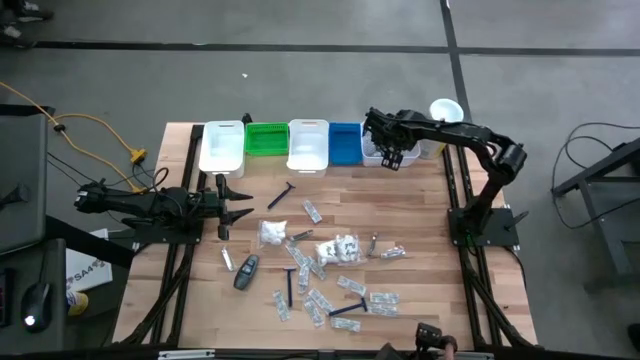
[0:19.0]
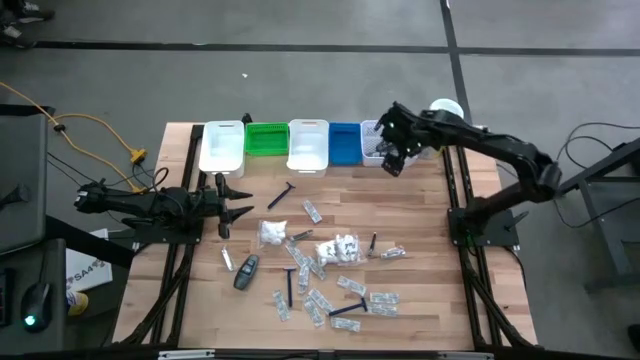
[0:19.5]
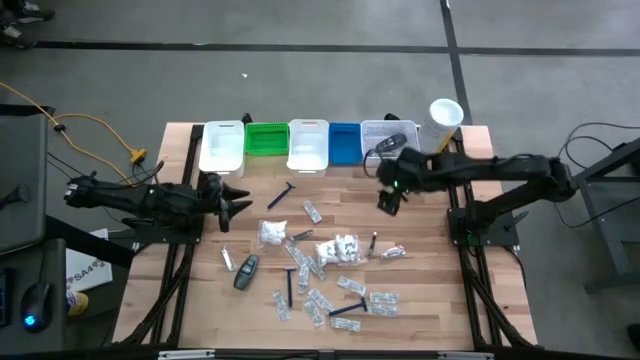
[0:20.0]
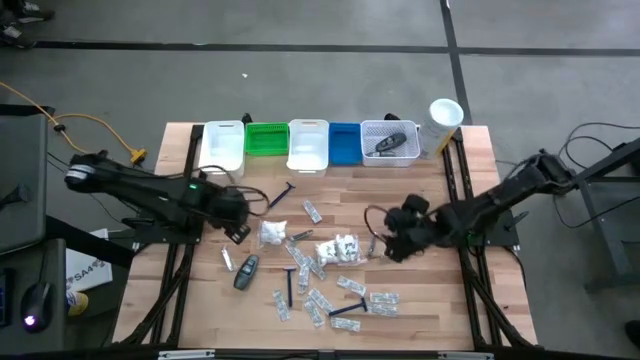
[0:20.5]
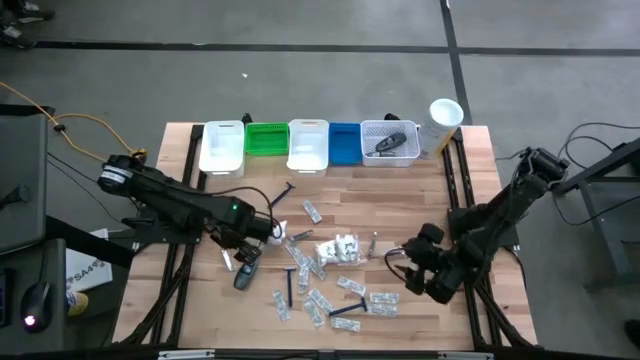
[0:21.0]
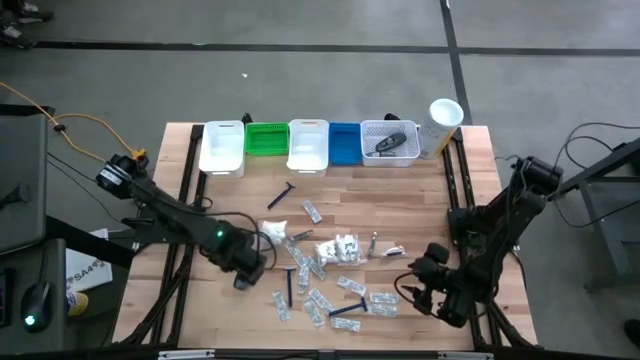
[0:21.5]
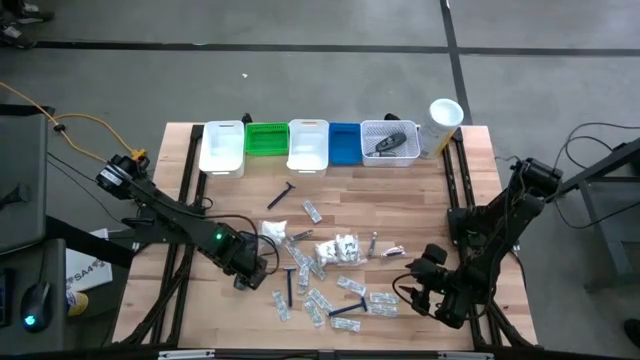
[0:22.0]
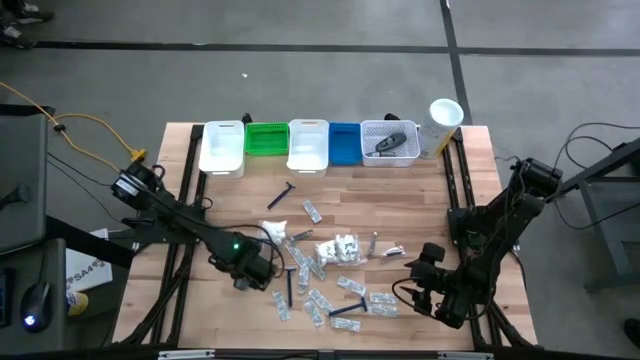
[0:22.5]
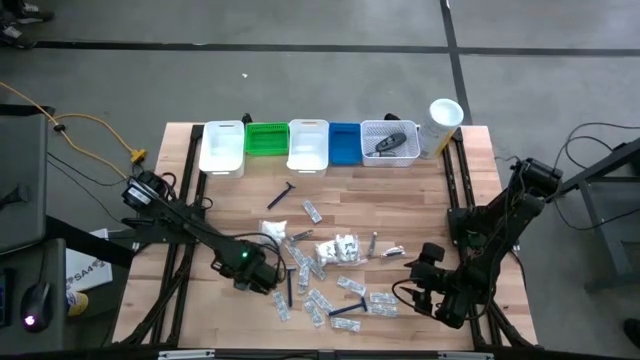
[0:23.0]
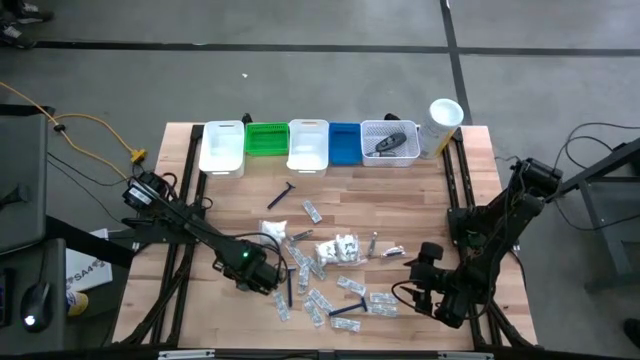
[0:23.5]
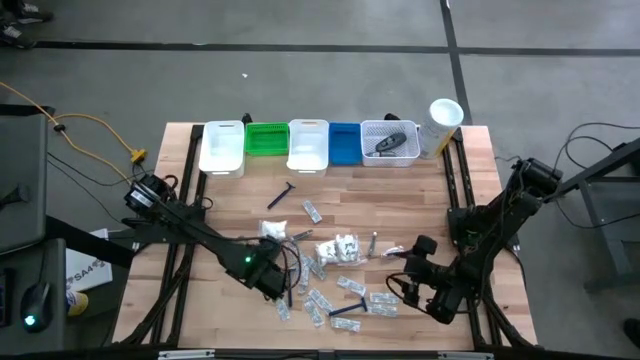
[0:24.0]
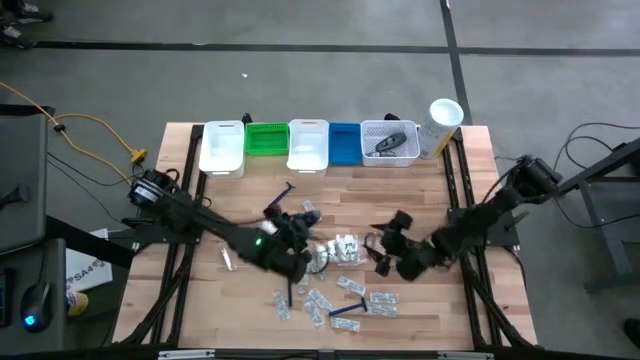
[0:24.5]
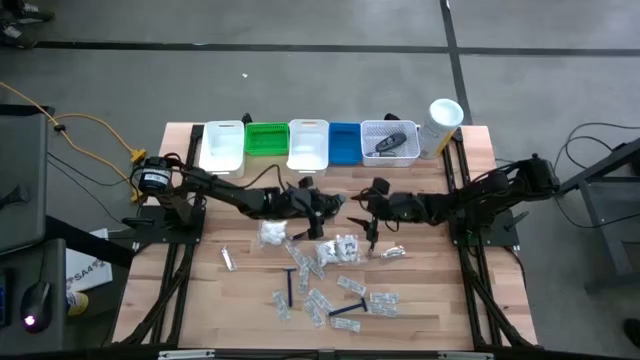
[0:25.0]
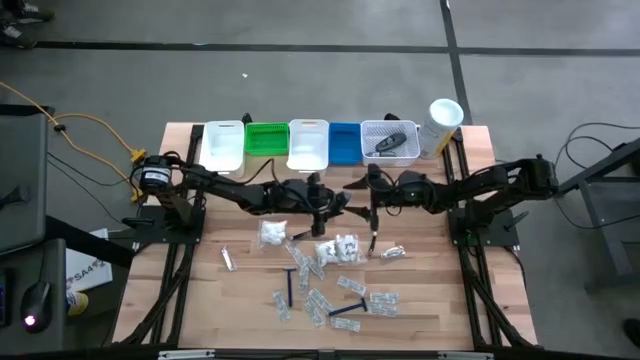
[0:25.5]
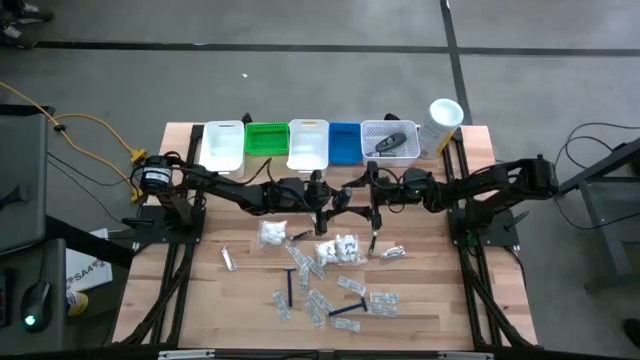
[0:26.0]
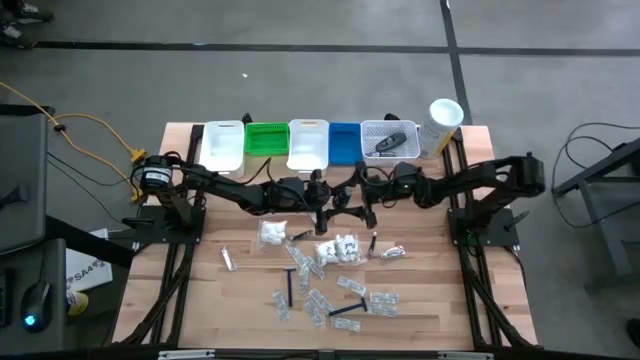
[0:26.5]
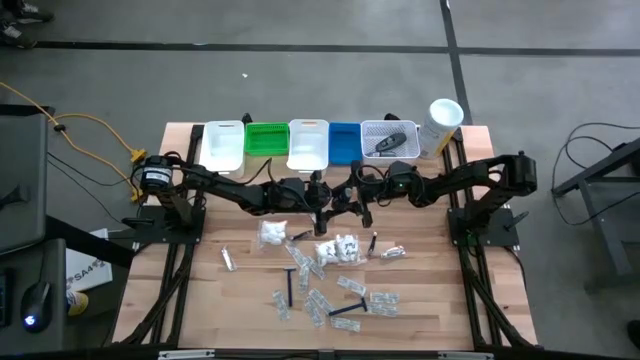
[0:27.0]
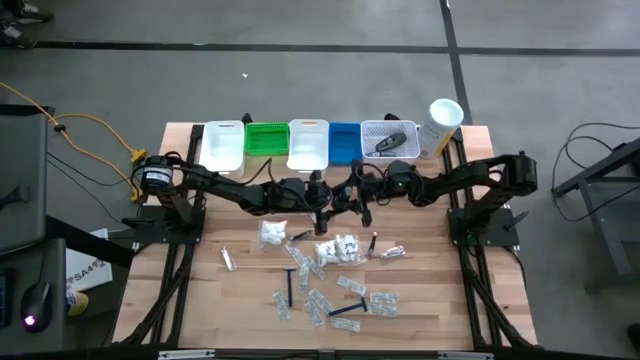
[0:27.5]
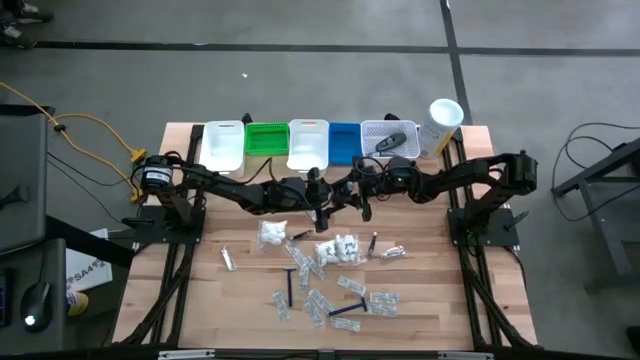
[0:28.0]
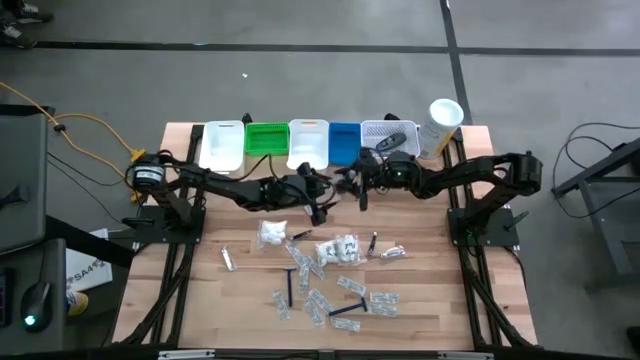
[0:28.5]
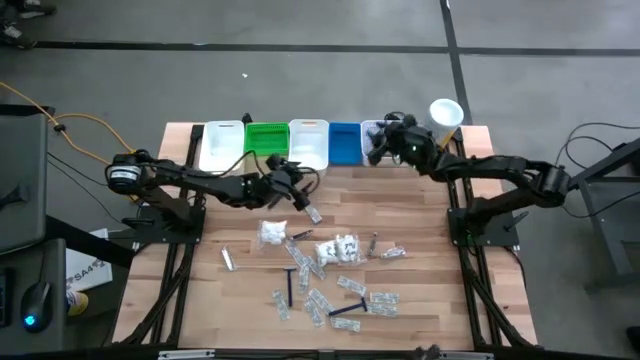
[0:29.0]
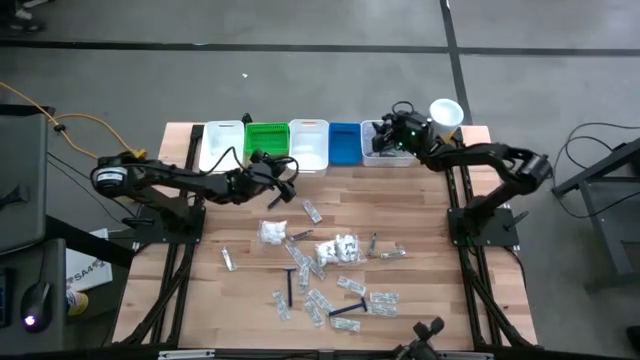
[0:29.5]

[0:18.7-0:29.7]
Task: Pick & Place Travel size toiletries
Put the black deodorant into the right white bin

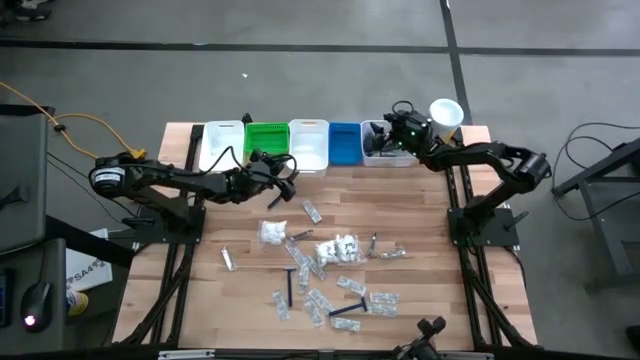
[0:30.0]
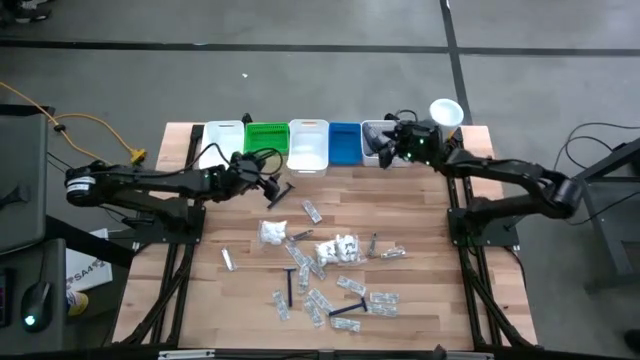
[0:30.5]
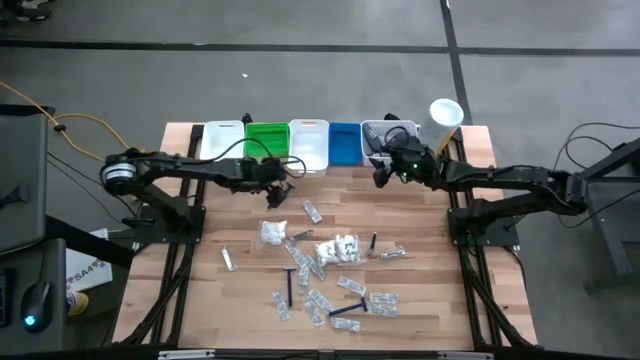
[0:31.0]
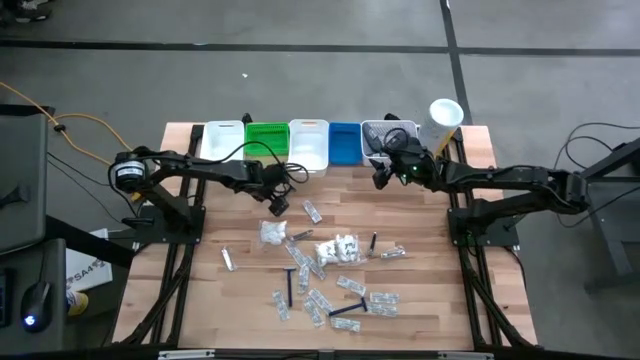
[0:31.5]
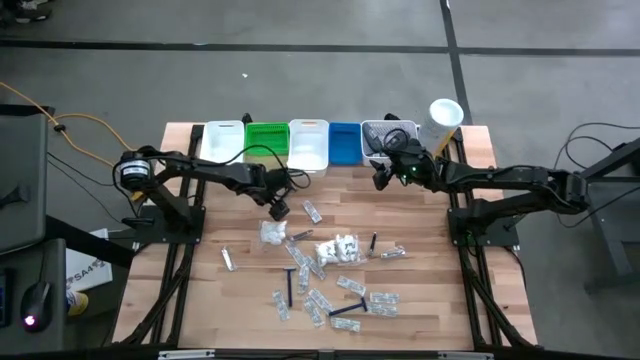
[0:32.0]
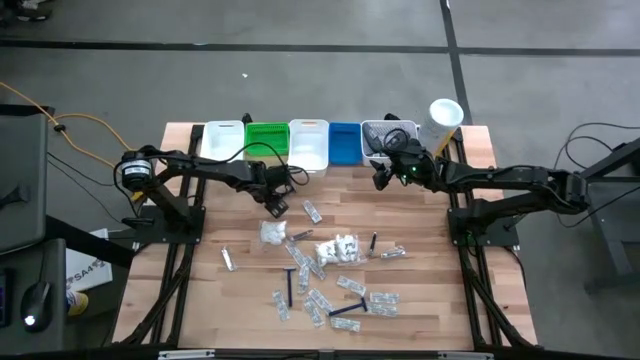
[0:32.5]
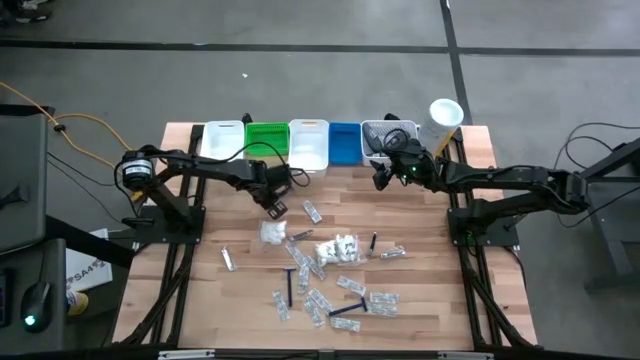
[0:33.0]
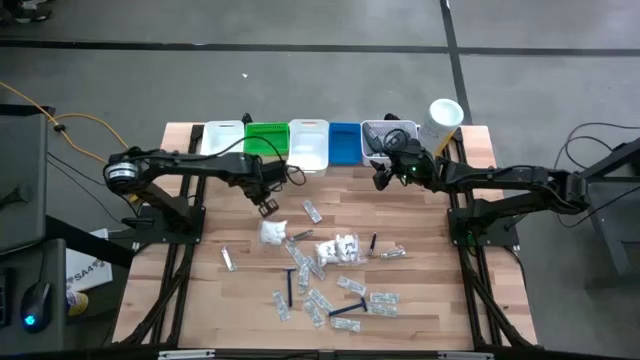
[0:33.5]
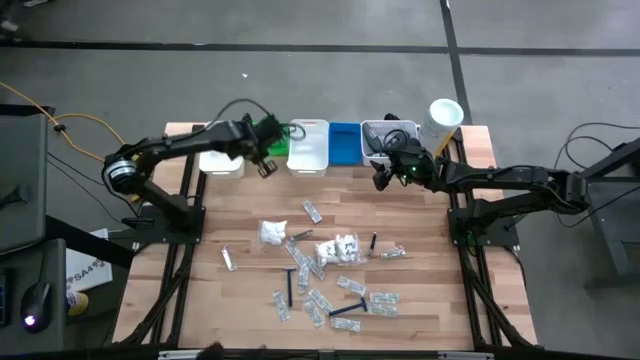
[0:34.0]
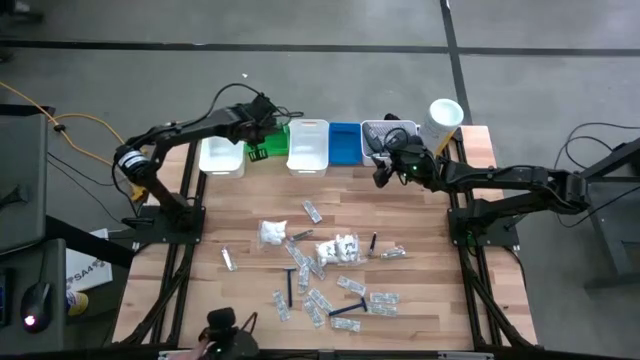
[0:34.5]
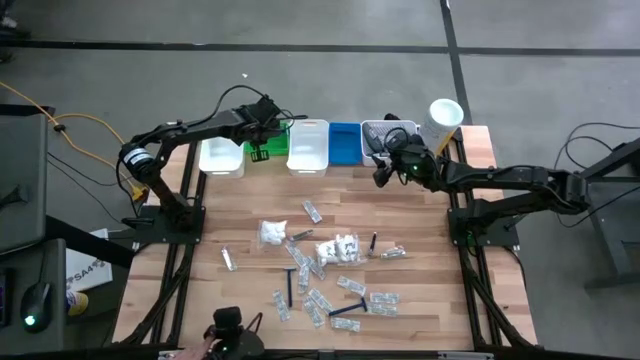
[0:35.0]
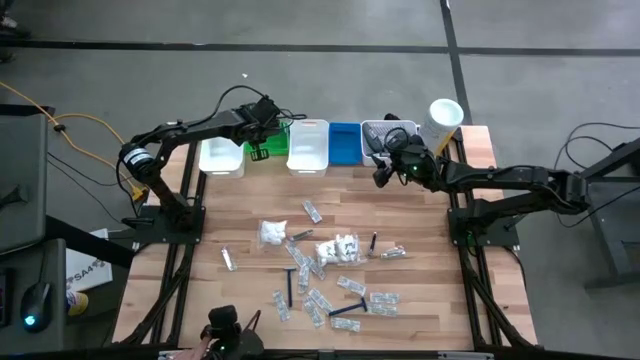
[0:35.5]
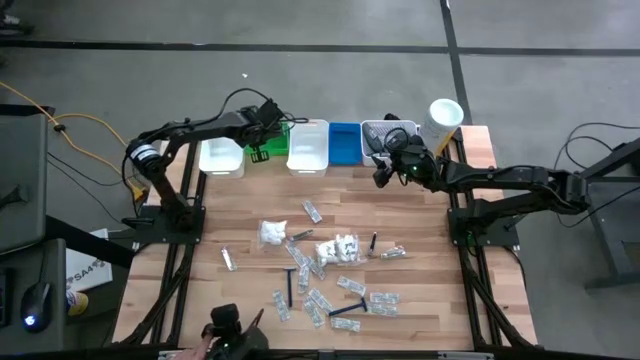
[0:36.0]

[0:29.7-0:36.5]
Put the blue razor into the green bin

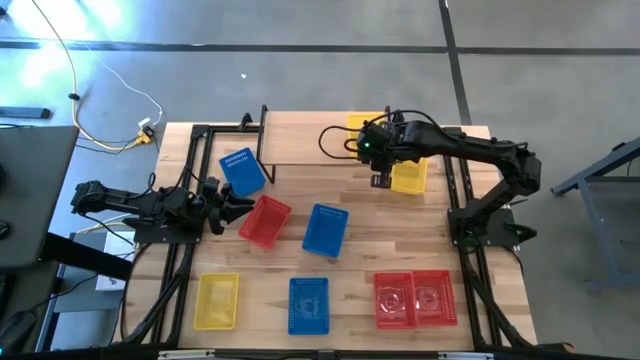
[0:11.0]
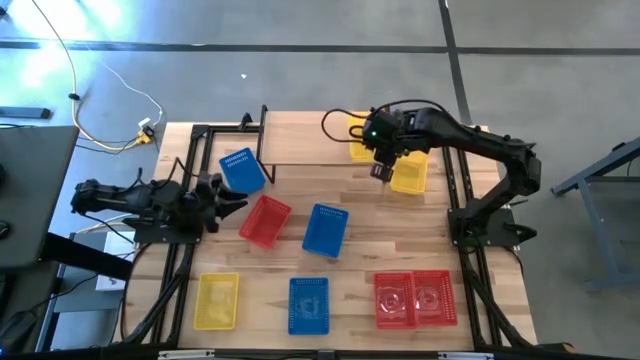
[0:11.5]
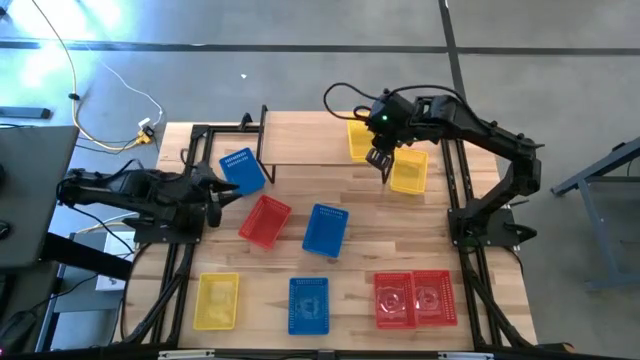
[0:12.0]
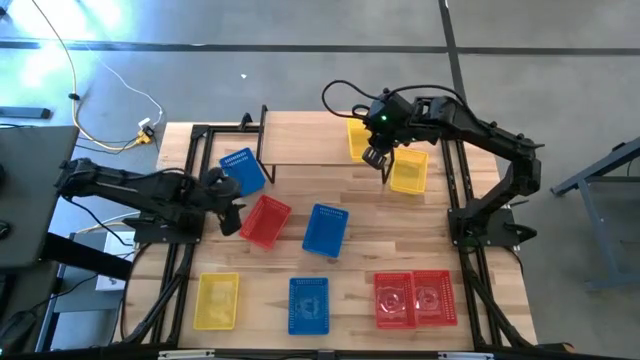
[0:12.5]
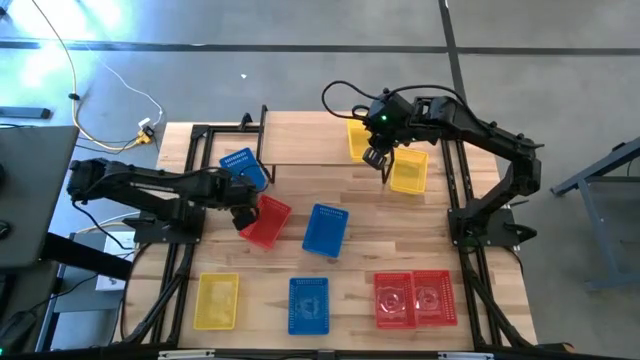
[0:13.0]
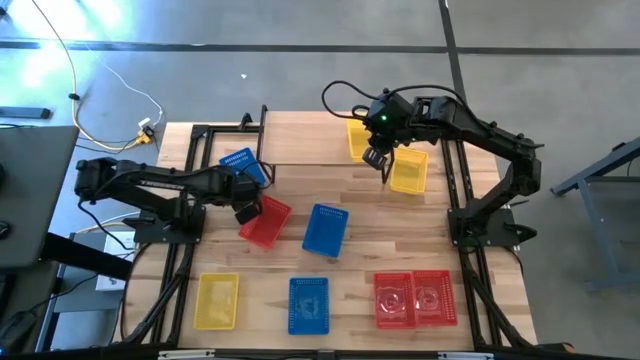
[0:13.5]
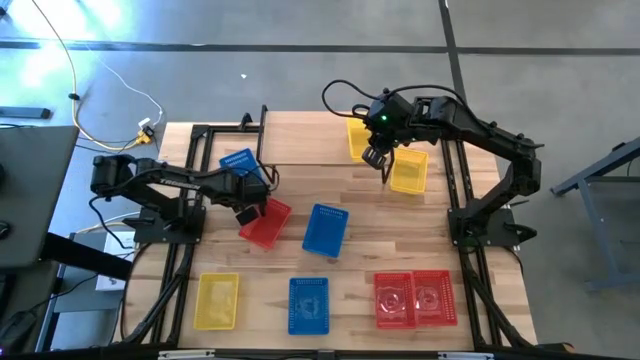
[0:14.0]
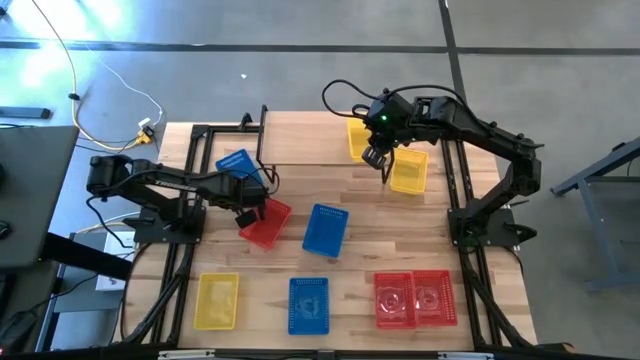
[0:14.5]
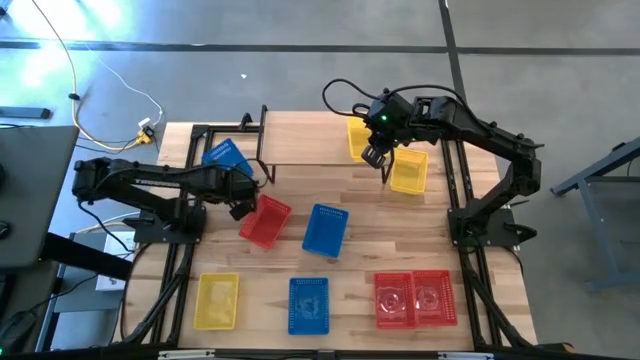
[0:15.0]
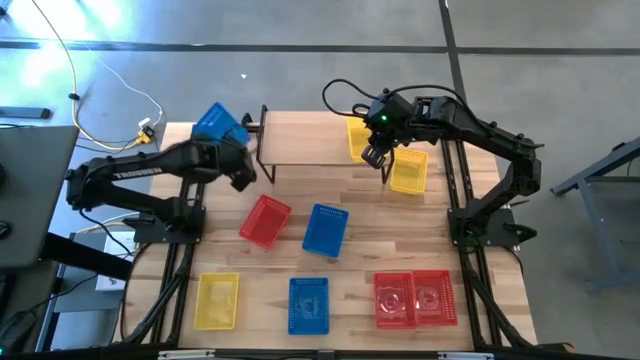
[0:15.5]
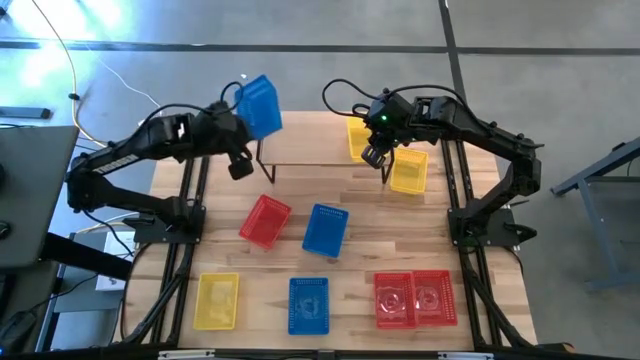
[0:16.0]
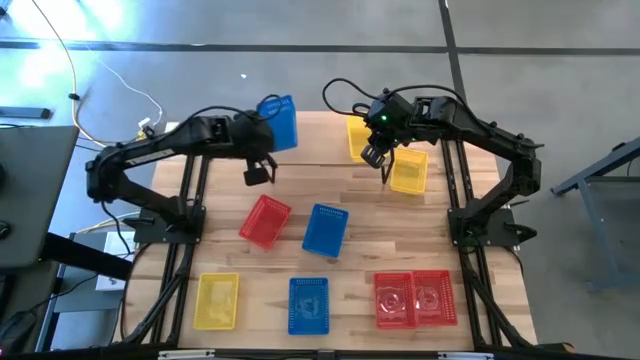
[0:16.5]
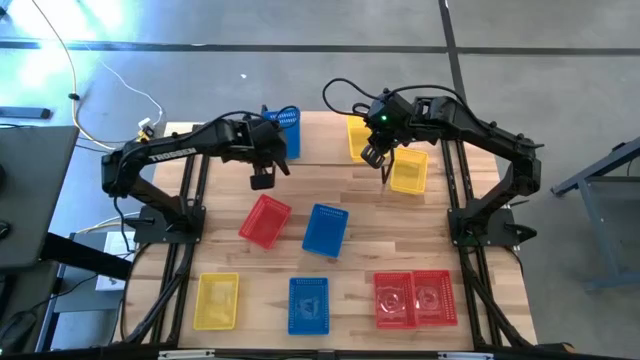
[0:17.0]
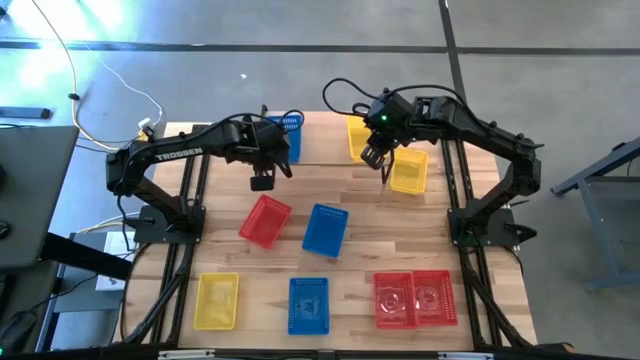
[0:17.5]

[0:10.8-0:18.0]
Task: Stack baskets on shelf by color
Put the top blue basket on the shelf
